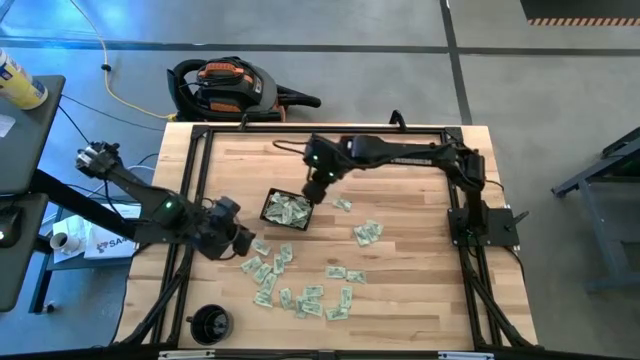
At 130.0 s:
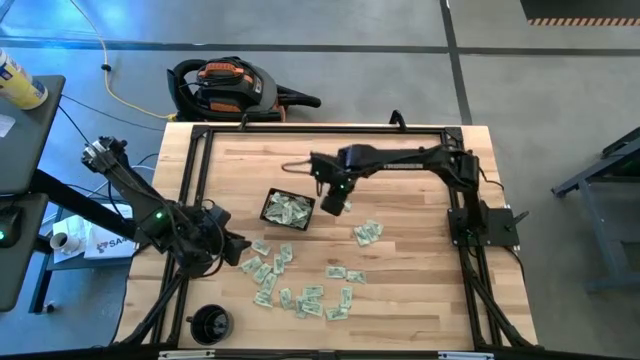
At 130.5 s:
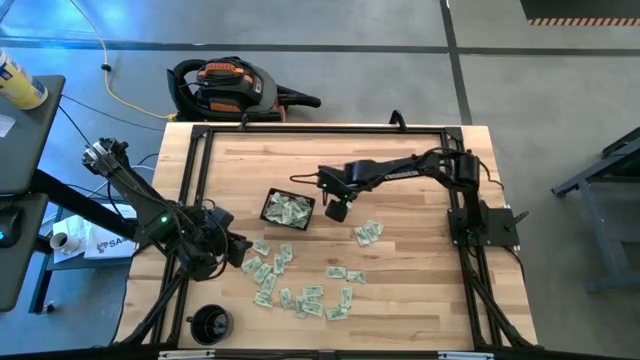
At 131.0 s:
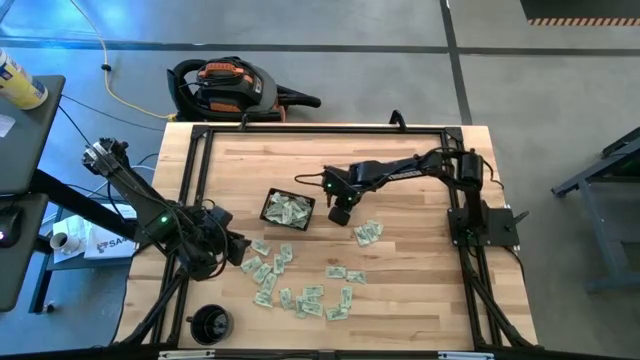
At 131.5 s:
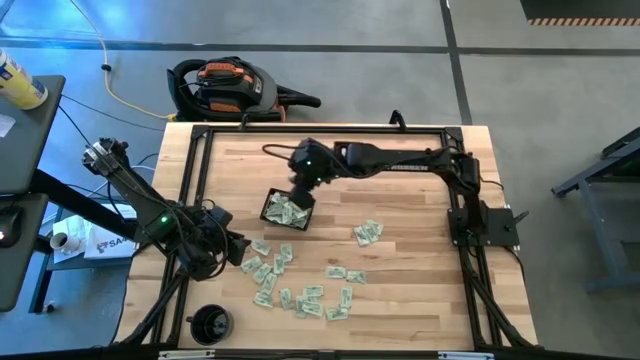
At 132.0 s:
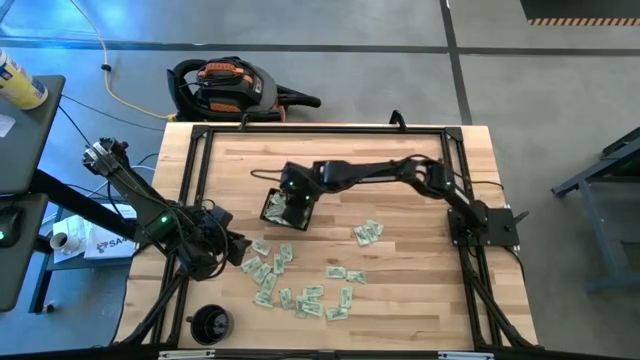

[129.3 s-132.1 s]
Task: Pick and place Stevia / Truvia into bins
Put the green stevia packet into the black basket

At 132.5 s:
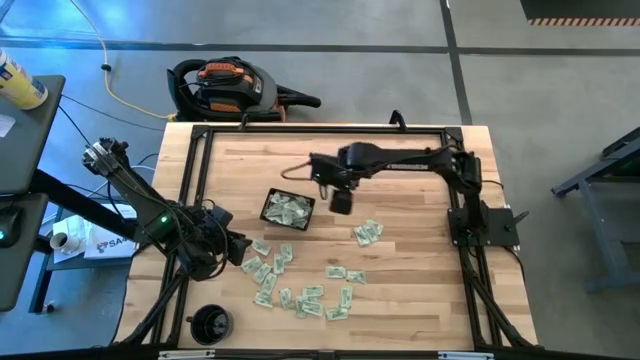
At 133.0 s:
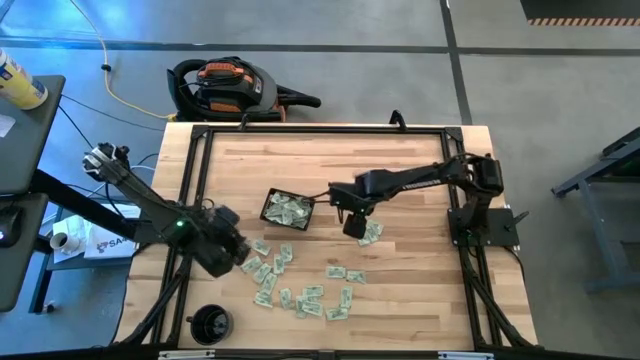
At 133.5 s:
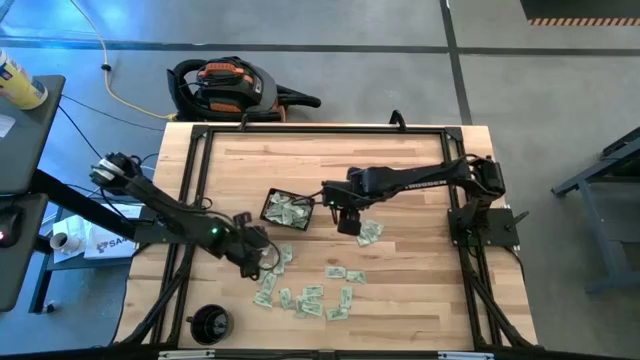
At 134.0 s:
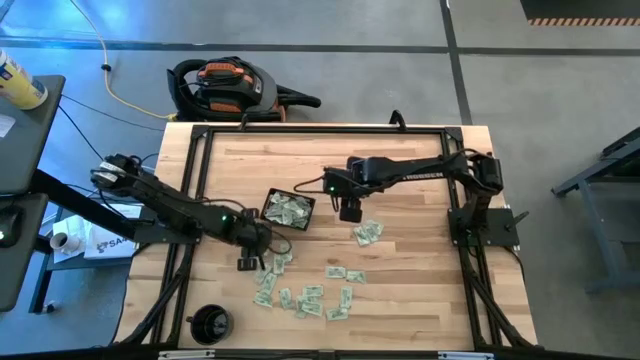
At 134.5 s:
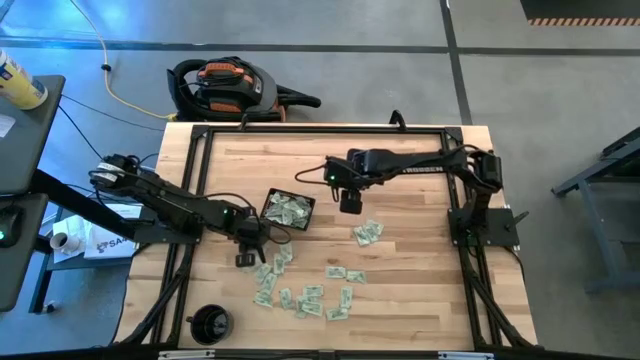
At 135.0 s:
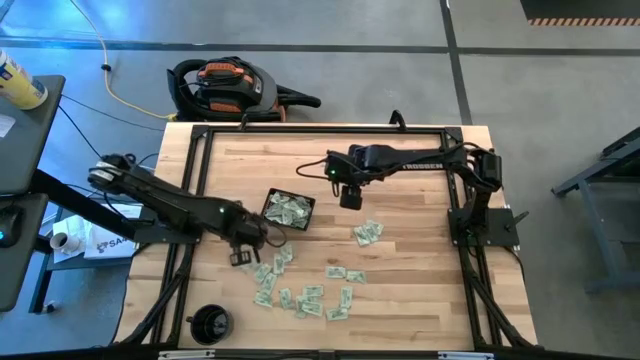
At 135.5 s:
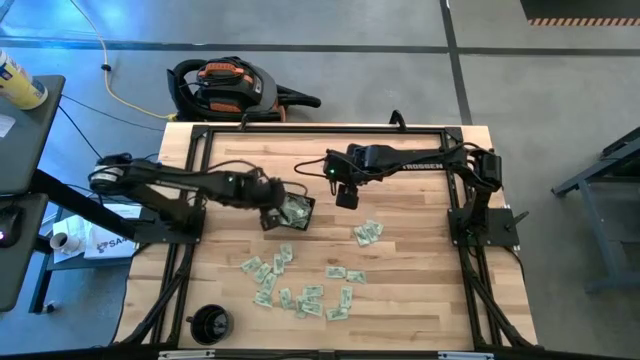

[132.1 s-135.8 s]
Put the green stevia packet into the black basket

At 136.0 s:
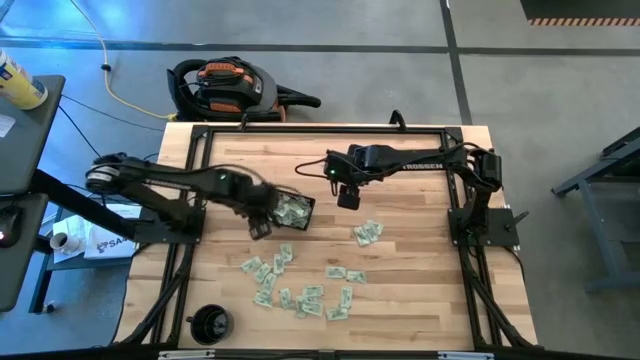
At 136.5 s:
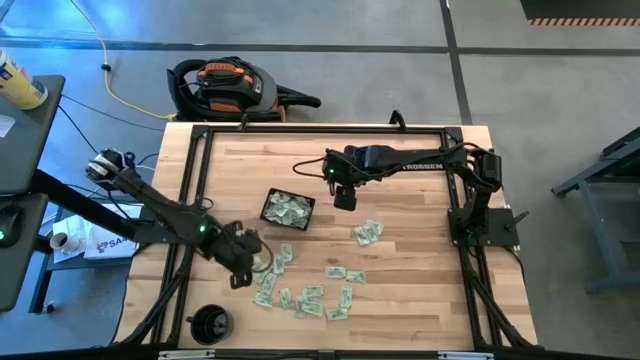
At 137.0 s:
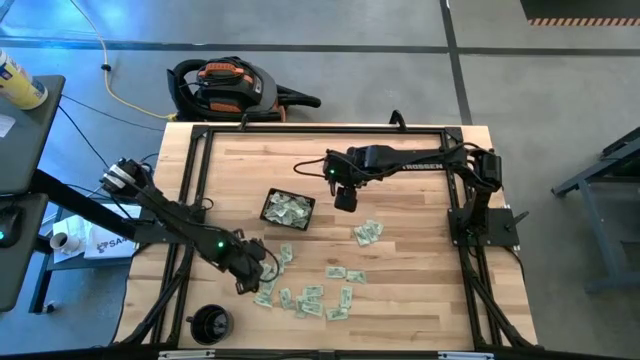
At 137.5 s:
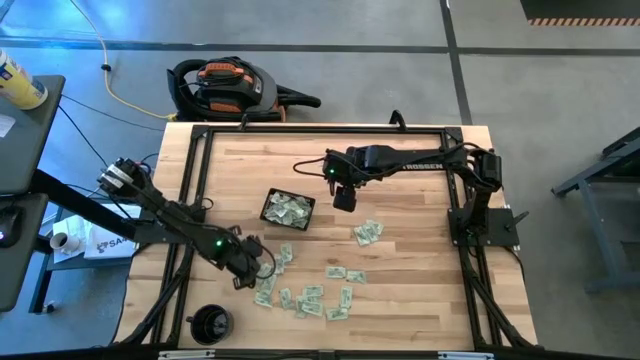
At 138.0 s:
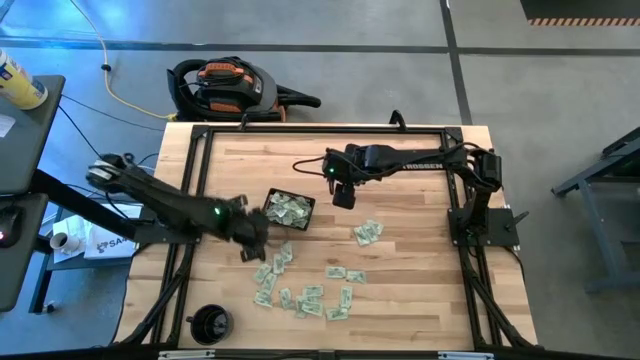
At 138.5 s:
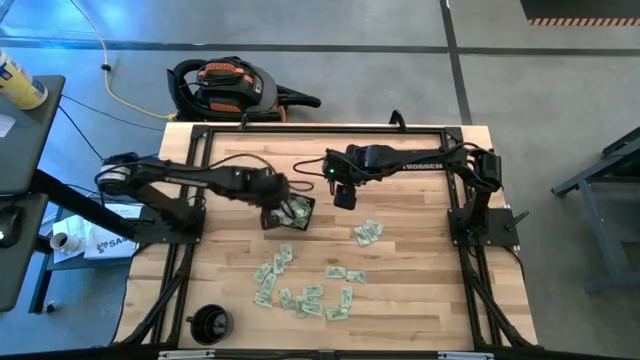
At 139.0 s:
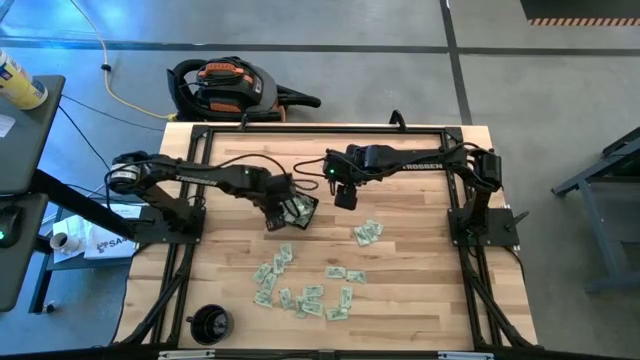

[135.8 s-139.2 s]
Put the green stevia packet into the black basket

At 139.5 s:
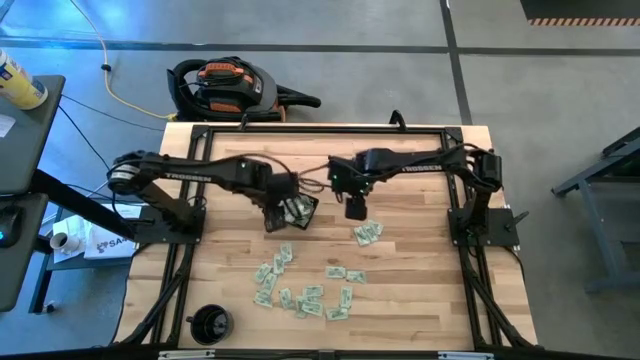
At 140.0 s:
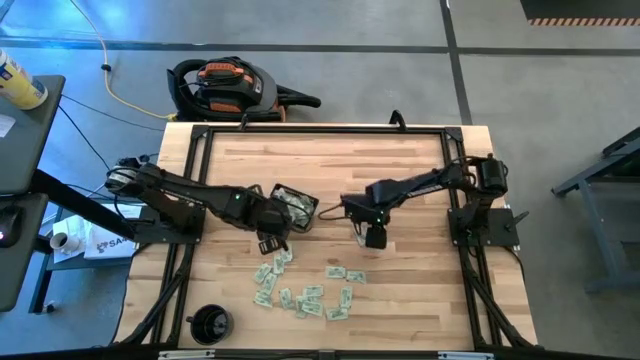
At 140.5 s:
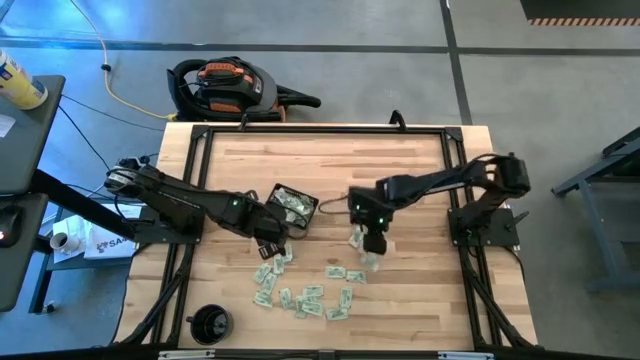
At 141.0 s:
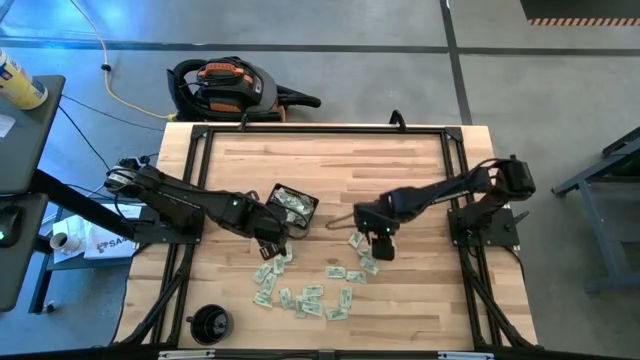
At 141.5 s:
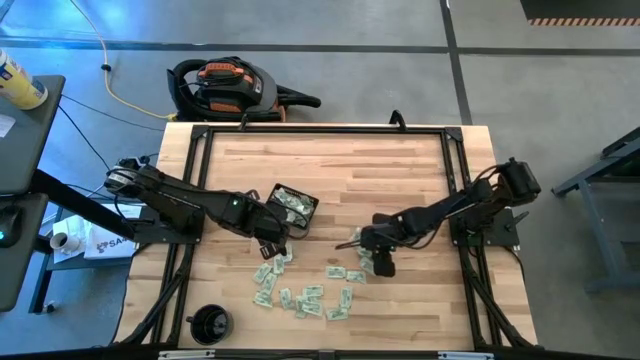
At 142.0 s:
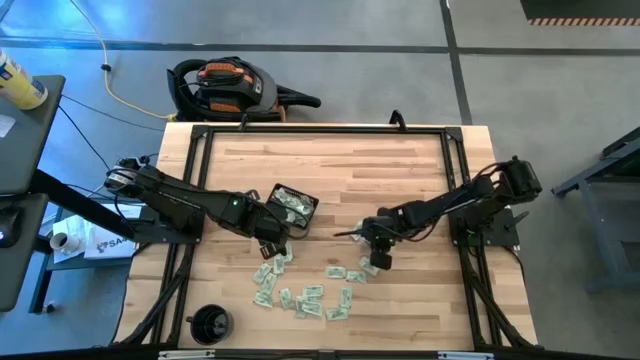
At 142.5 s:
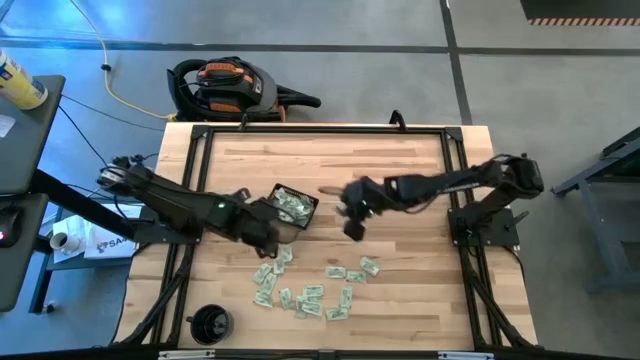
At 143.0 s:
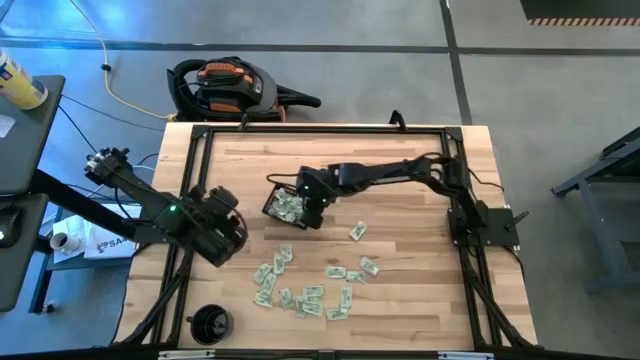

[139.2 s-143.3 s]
Put the green stevia packet into the black basket

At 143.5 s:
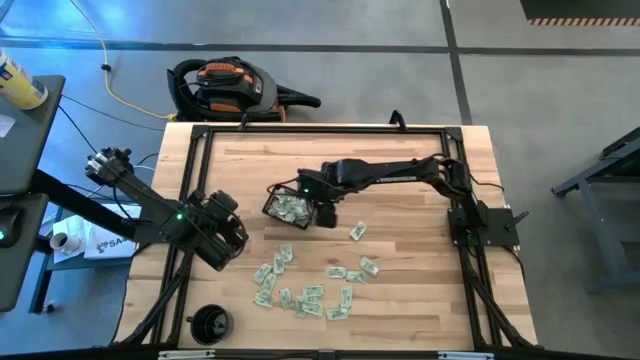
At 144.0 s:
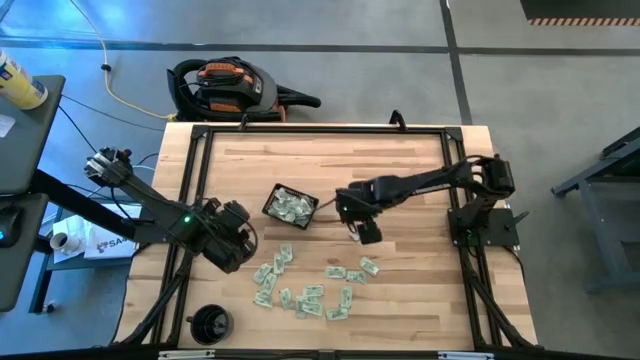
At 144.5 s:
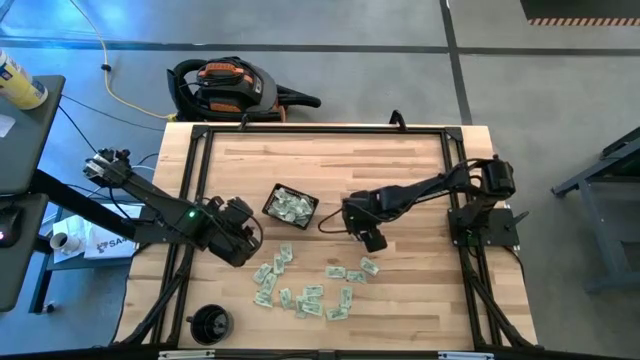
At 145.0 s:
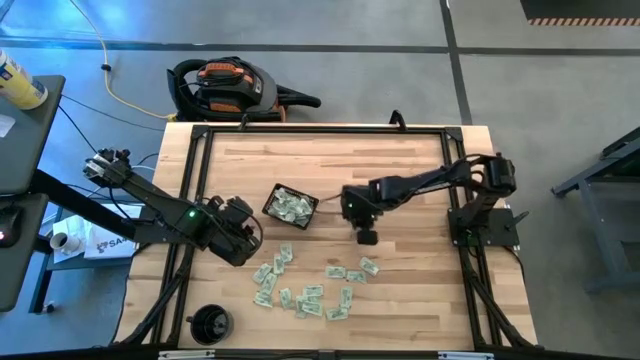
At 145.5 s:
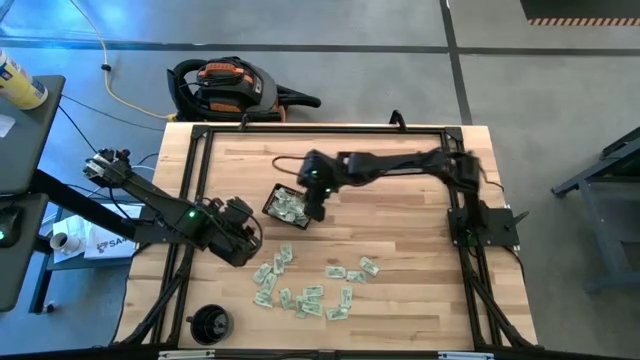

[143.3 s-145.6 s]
Put the green stevia packet into the black basket

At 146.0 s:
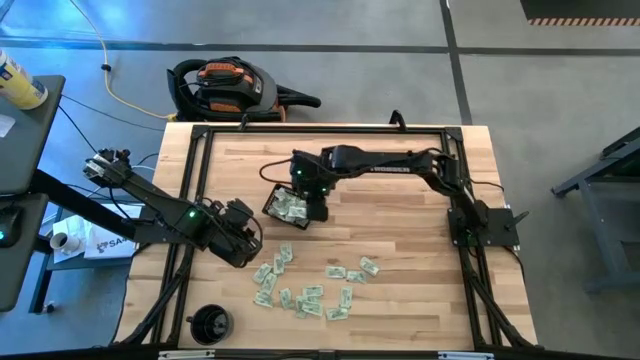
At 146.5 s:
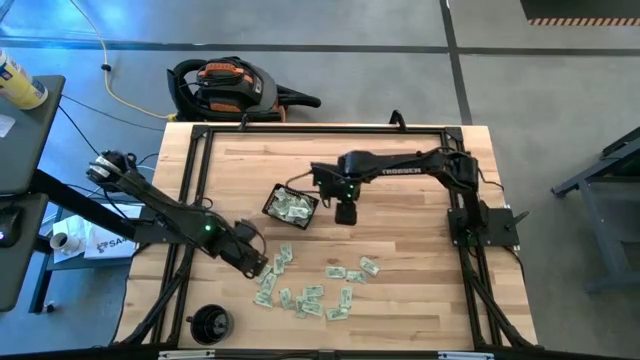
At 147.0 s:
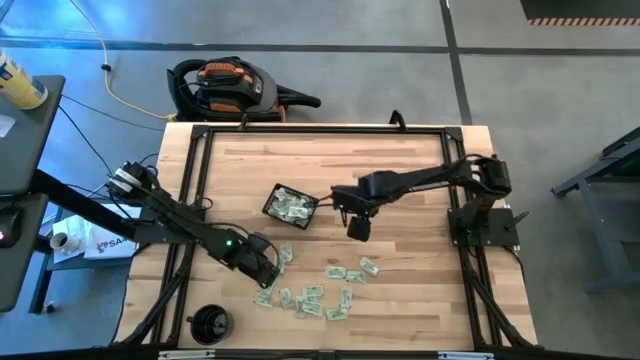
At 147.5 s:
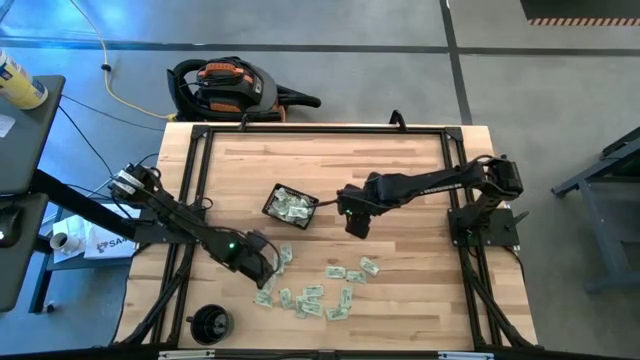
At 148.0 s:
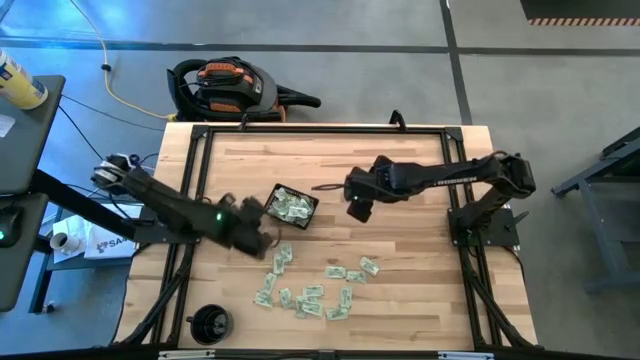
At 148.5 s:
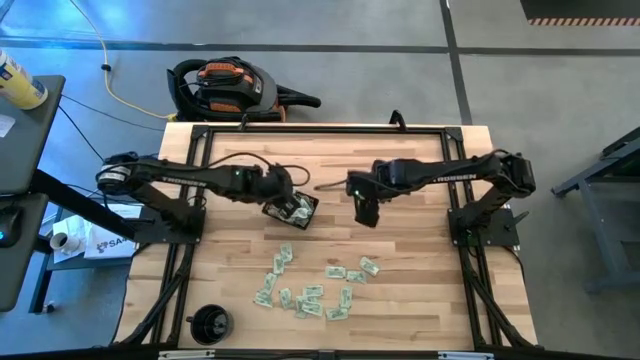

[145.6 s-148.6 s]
Put the green stevia packet into the black basket

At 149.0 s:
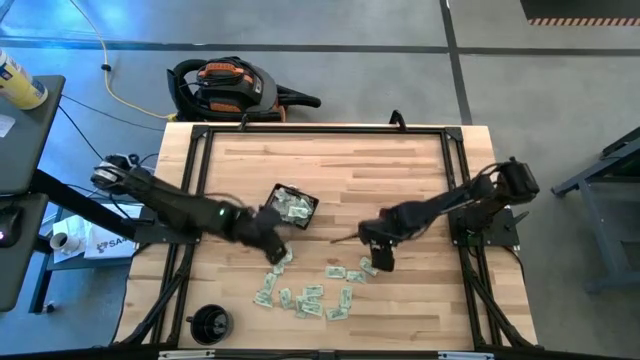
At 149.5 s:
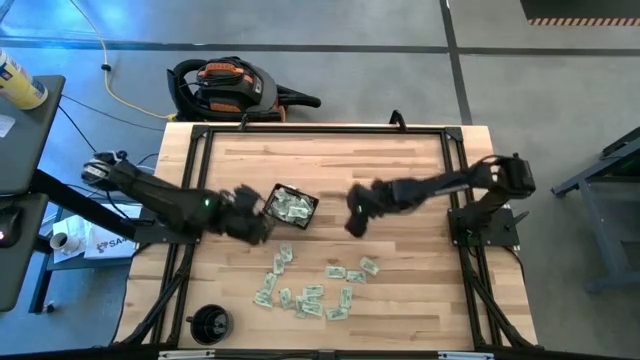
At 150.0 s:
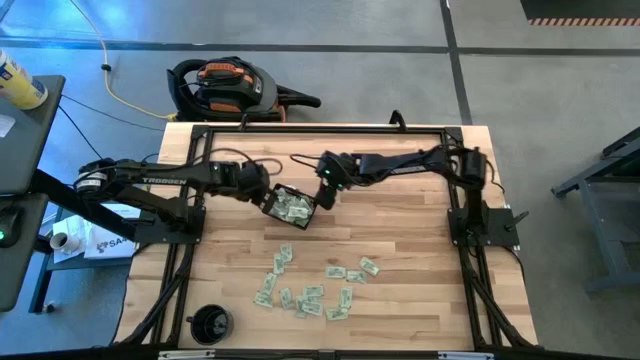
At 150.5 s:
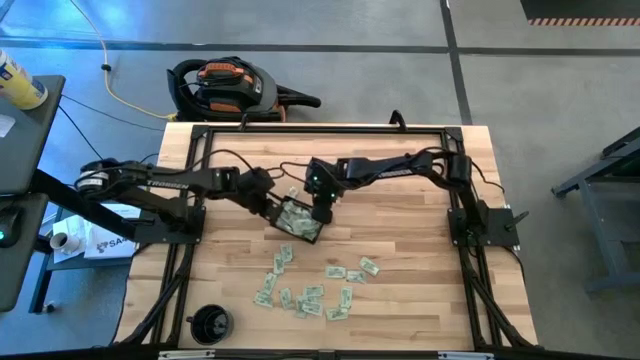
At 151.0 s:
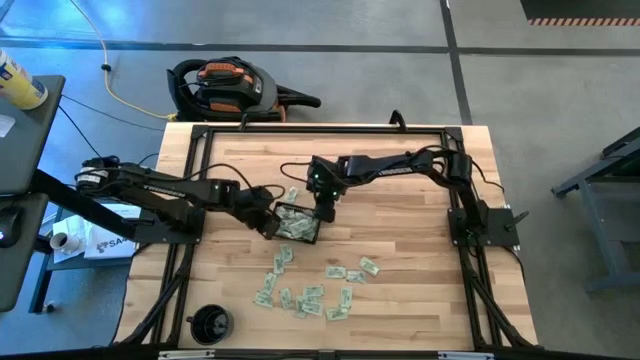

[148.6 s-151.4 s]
Adjust the black basket
